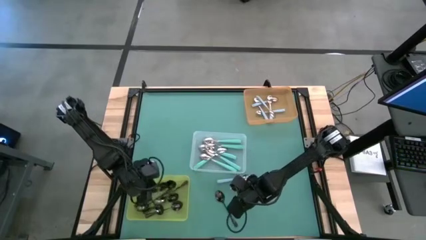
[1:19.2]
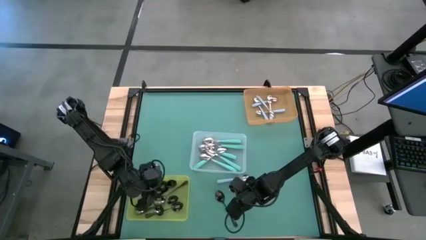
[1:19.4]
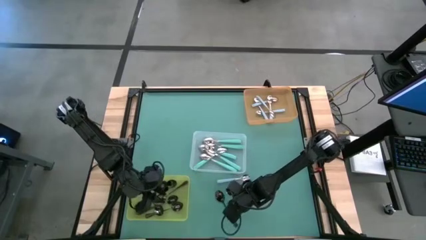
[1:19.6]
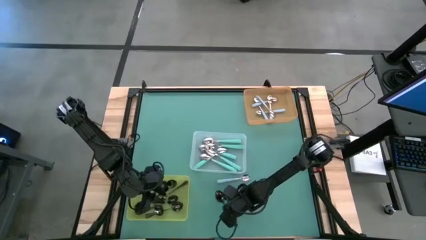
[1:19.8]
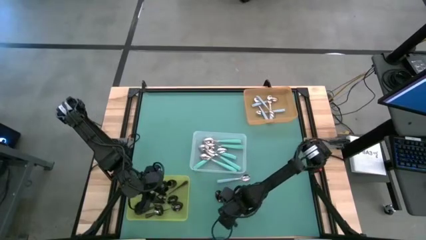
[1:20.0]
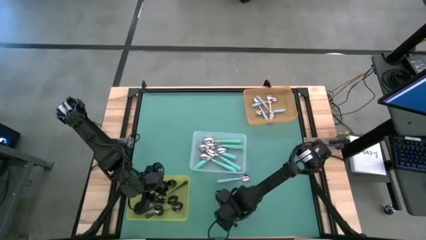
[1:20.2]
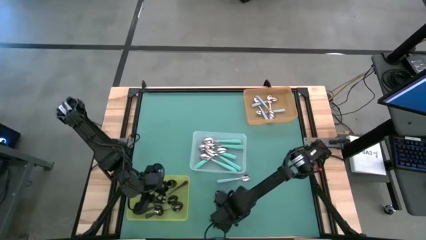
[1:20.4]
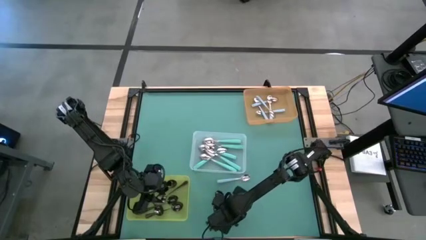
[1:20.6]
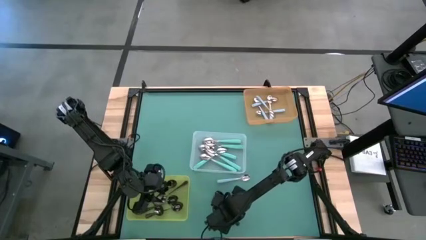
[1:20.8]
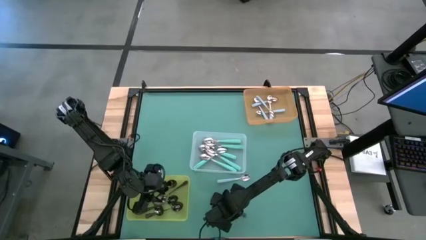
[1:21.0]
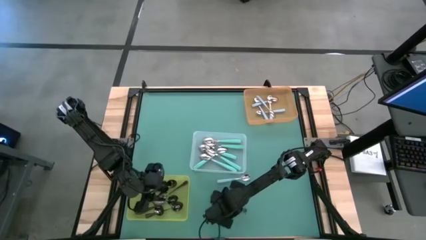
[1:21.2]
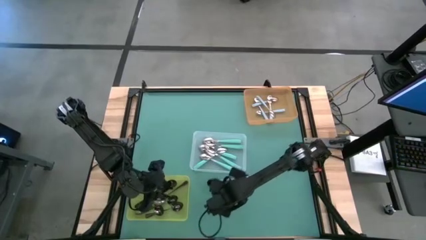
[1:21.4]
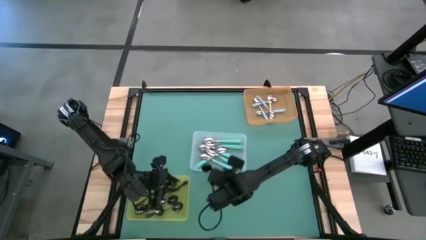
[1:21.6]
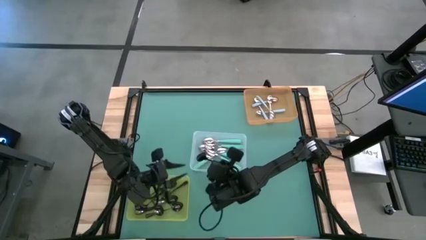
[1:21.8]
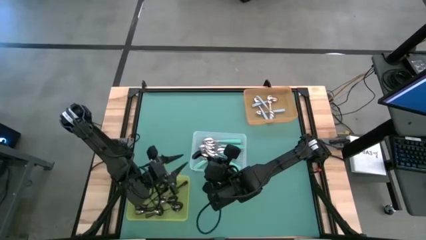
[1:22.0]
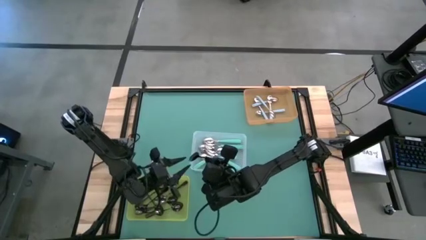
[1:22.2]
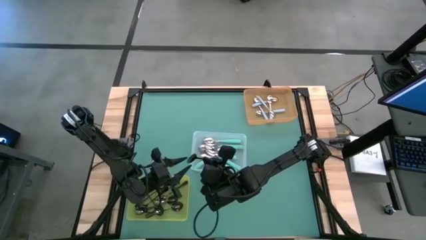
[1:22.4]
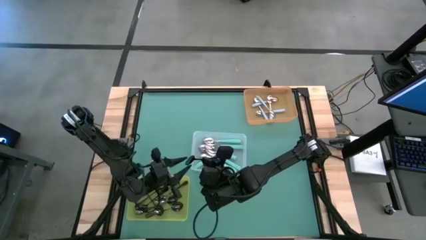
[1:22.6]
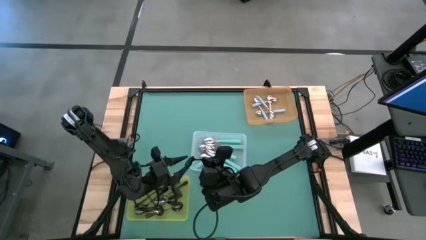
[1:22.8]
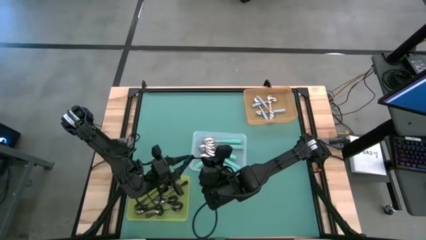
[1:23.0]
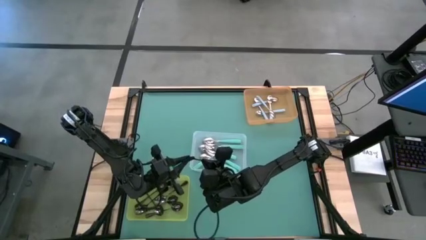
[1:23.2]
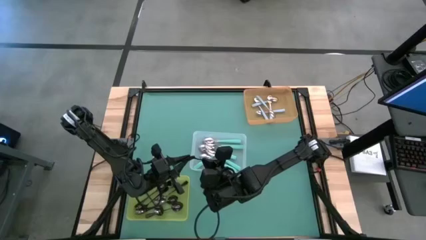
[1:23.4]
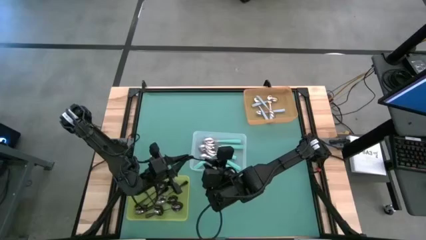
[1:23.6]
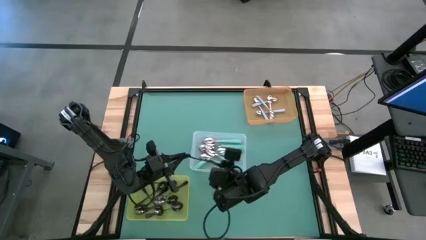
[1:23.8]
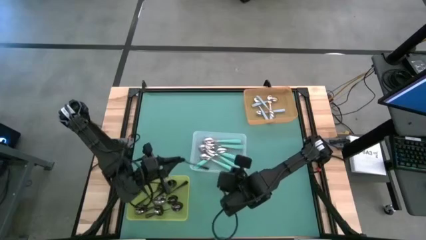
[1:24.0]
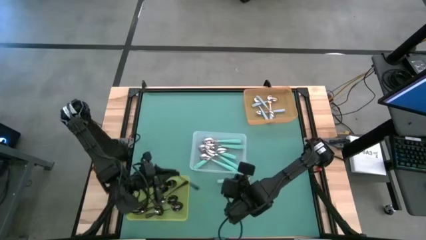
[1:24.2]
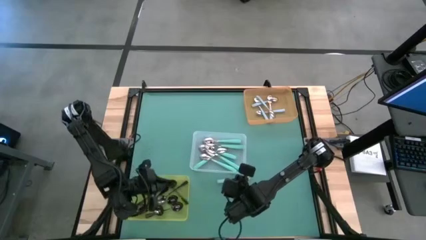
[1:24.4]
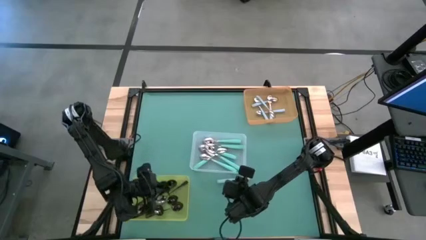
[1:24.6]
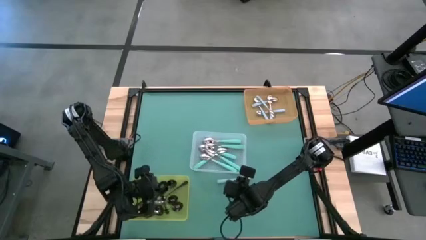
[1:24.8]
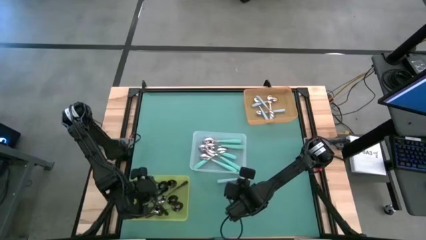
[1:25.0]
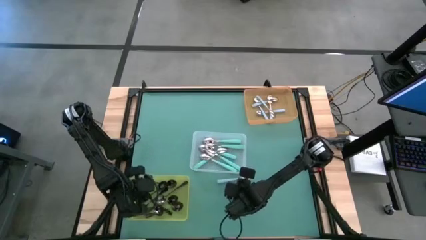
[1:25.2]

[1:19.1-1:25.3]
Task: Sort silverware by color (type)
Put the black spoon into the yellow bin

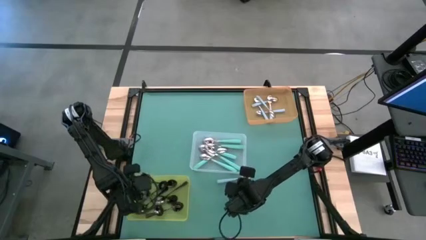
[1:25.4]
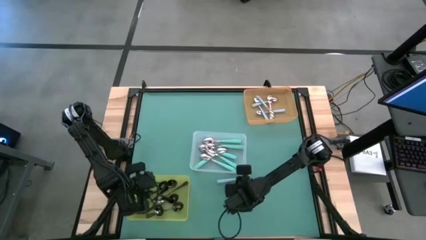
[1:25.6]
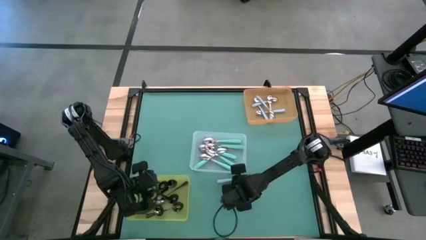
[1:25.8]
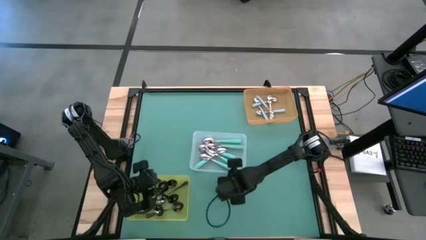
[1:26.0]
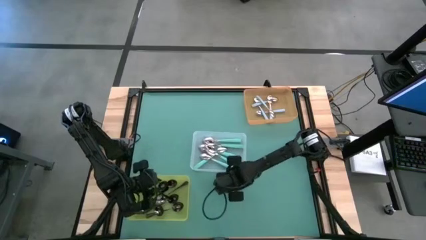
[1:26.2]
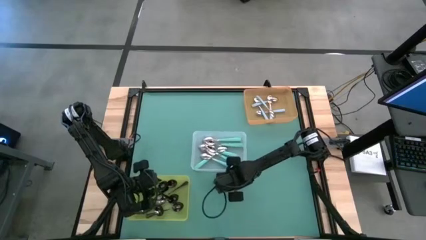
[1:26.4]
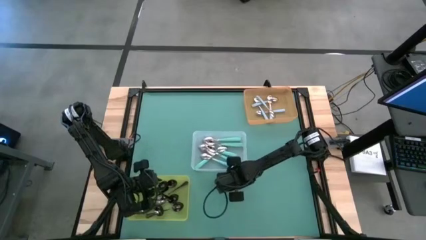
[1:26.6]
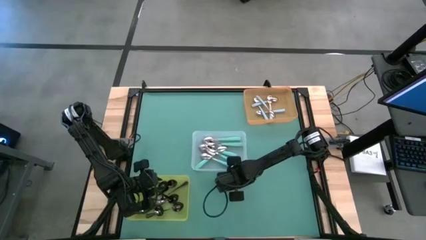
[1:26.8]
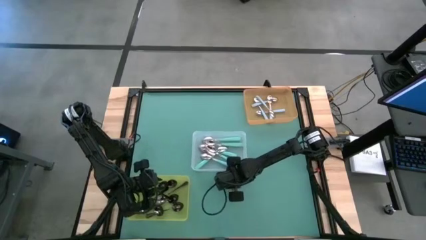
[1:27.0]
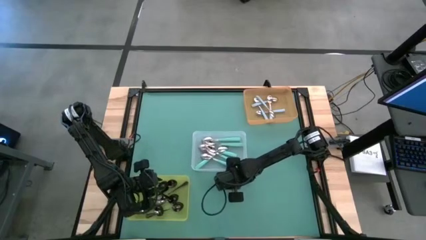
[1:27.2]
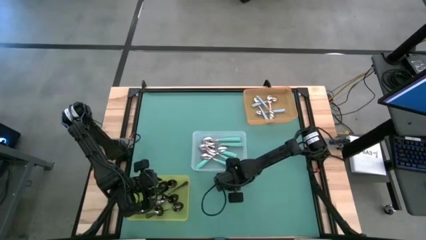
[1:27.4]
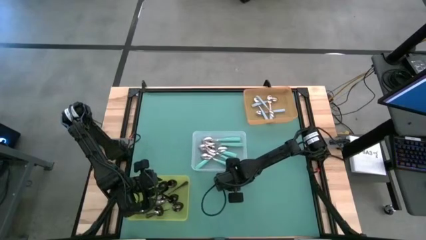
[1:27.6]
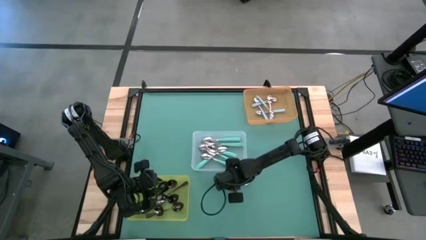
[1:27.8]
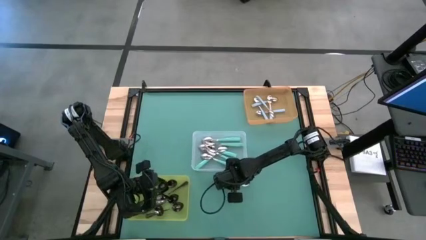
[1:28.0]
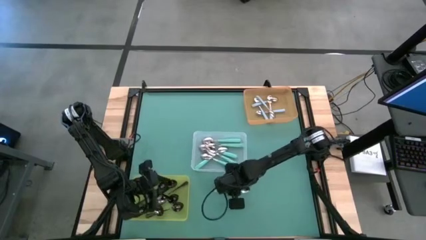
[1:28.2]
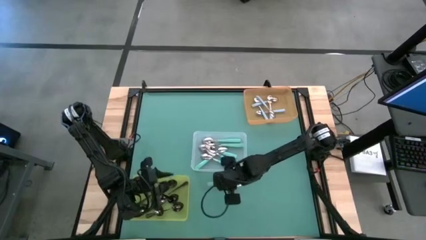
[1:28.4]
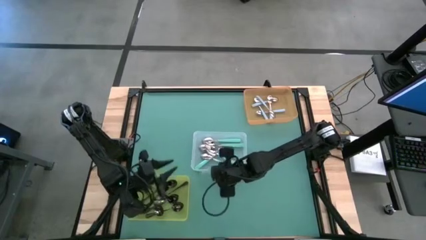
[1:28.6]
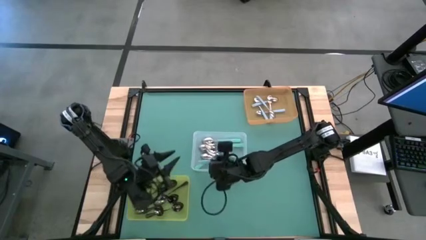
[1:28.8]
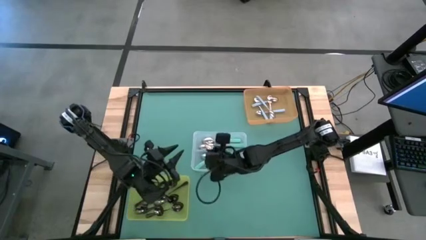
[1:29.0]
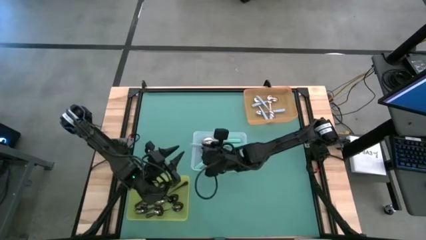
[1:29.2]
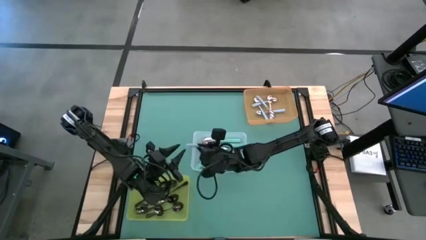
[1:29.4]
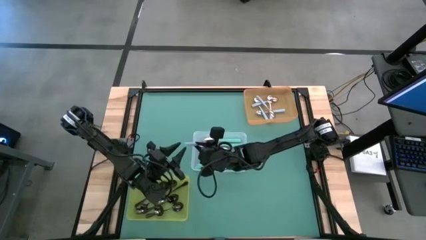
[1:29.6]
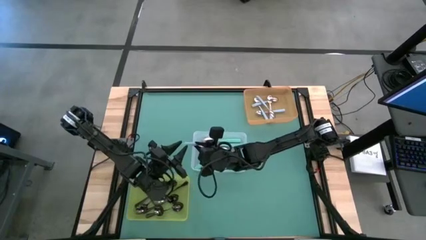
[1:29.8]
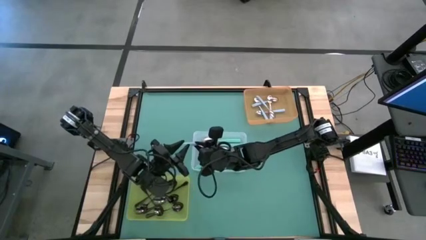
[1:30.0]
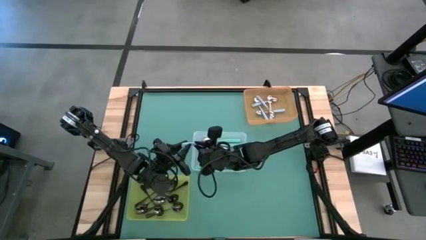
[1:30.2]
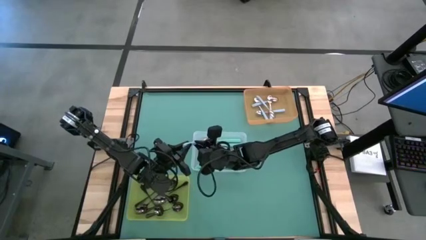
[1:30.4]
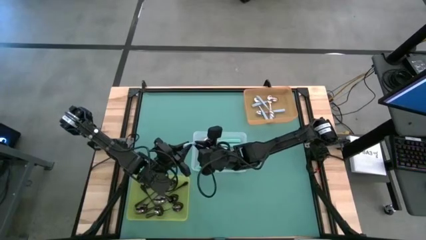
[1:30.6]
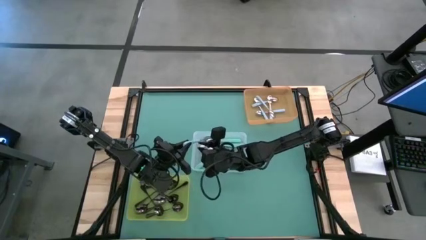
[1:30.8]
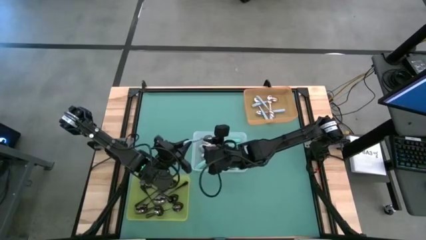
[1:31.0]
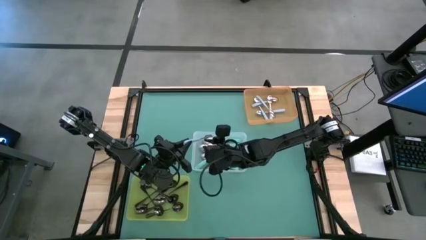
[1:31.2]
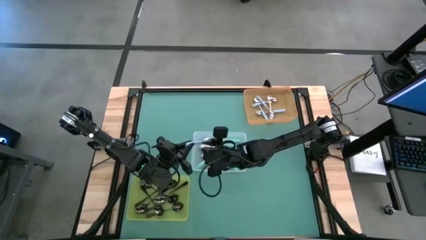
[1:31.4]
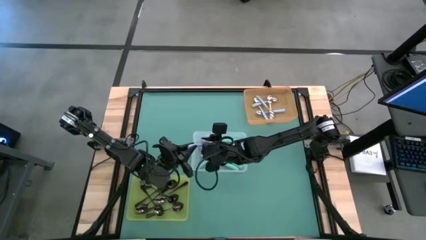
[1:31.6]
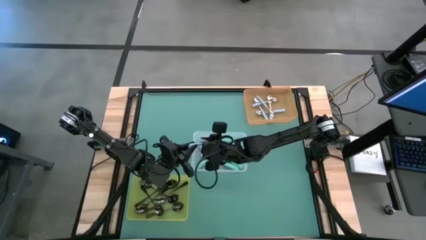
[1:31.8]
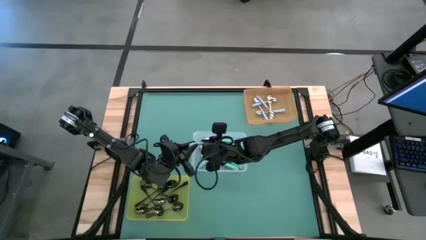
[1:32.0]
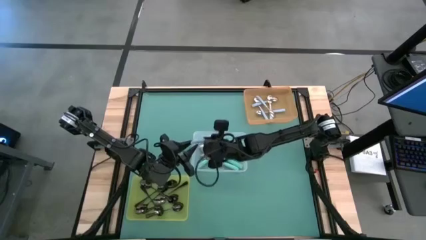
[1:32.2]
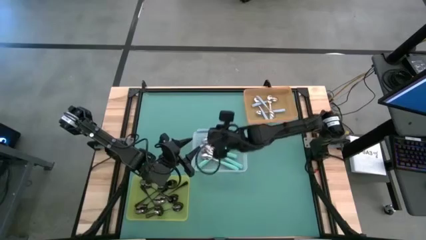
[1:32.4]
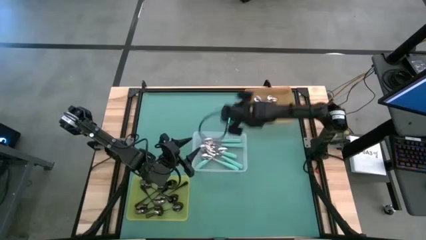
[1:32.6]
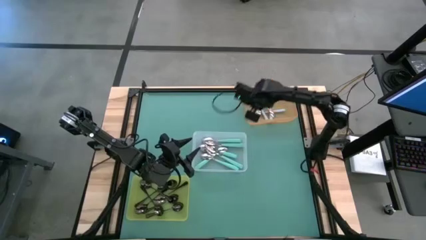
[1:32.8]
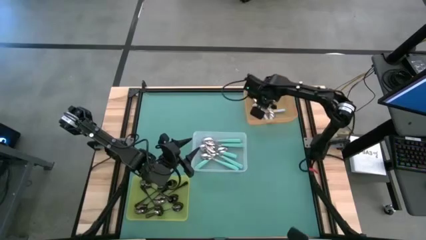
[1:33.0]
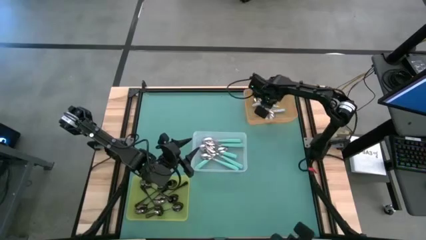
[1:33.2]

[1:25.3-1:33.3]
Put the purple into the orange bin

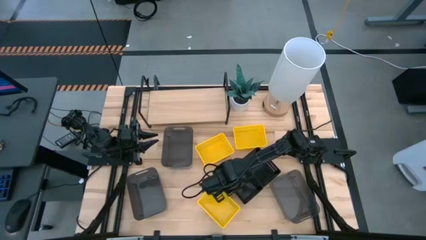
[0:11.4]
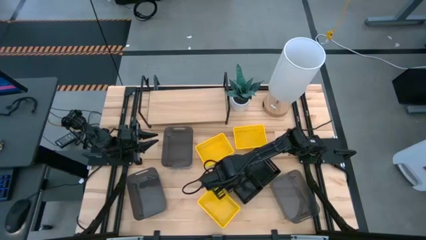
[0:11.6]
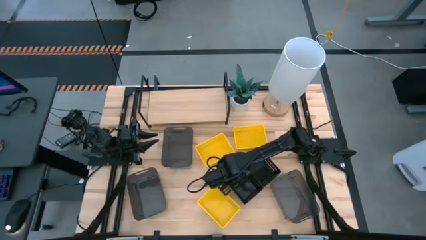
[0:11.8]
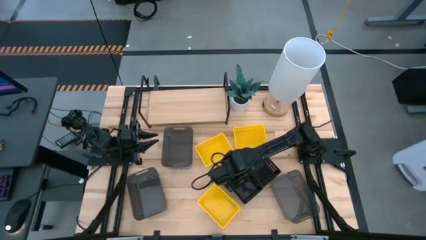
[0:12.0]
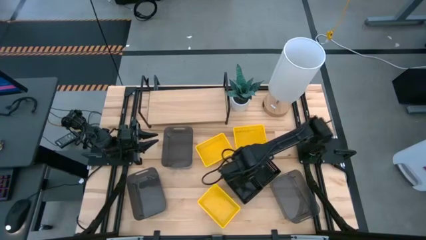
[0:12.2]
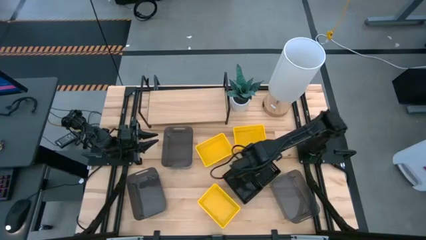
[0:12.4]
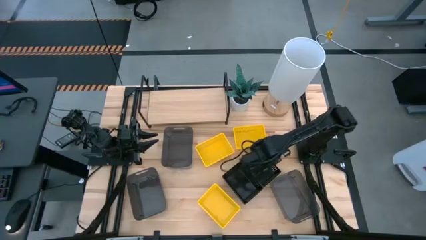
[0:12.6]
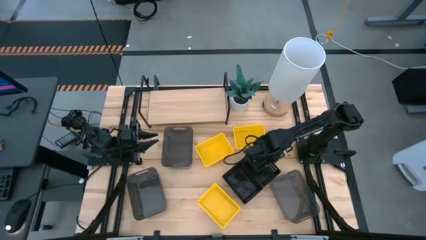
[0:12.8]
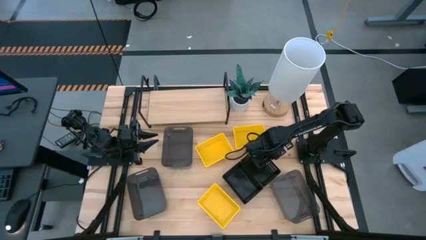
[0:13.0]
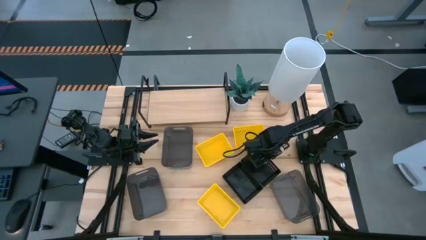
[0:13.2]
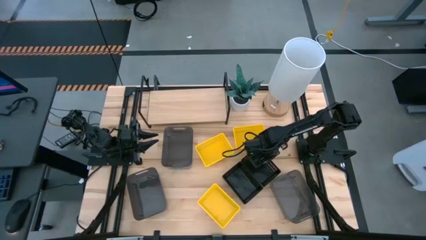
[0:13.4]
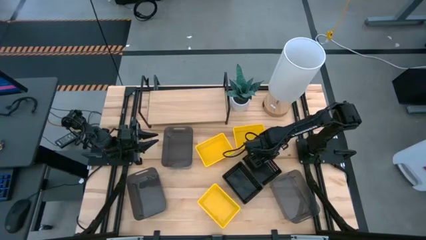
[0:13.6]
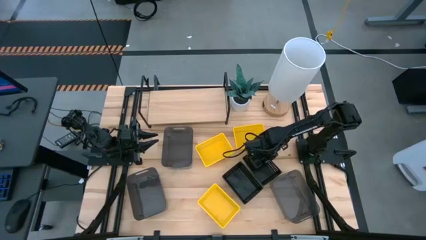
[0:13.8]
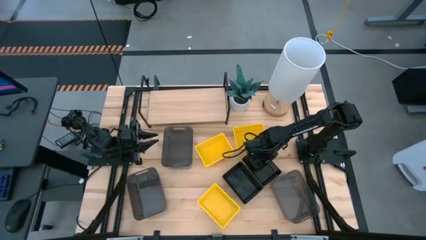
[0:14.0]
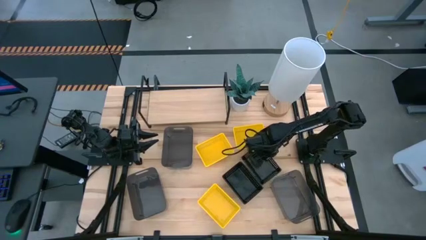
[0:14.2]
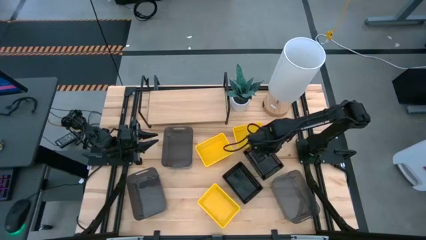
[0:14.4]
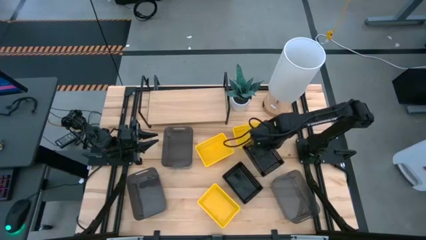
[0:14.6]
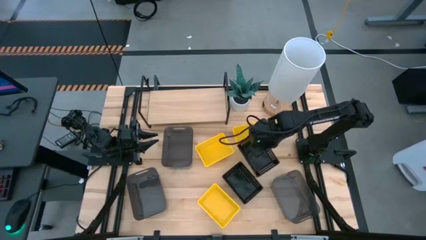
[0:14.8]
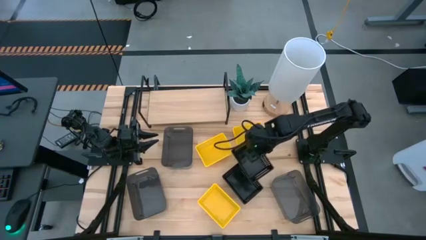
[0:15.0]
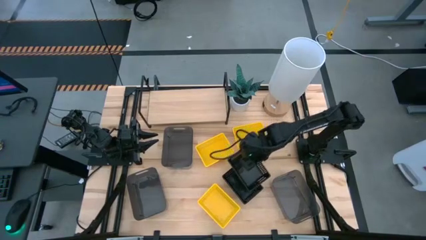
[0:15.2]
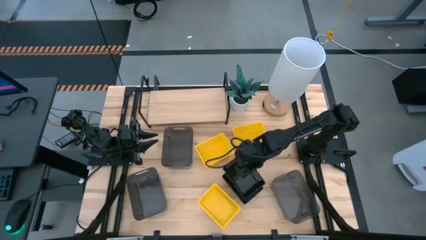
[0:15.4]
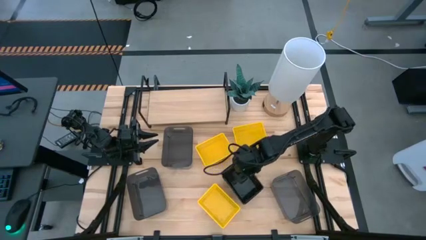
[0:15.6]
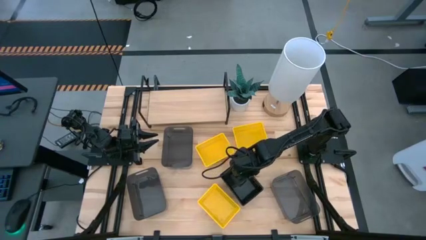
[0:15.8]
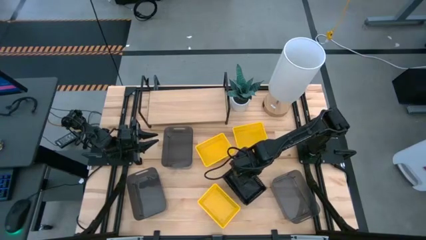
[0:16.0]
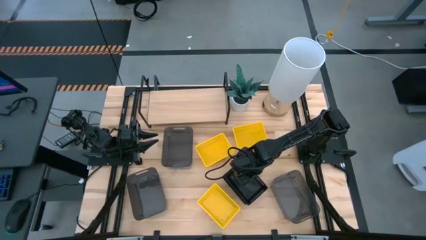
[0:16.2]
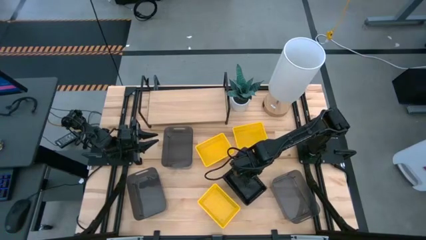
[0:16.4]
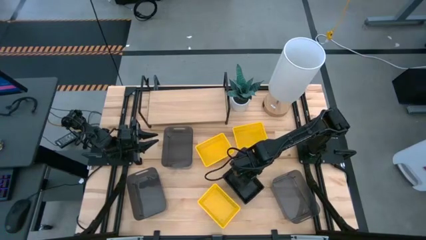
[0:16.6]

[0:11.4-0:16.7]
Task: Stack baskets on shelf by color
Stack the top black basket on top of the bottom black baskets
